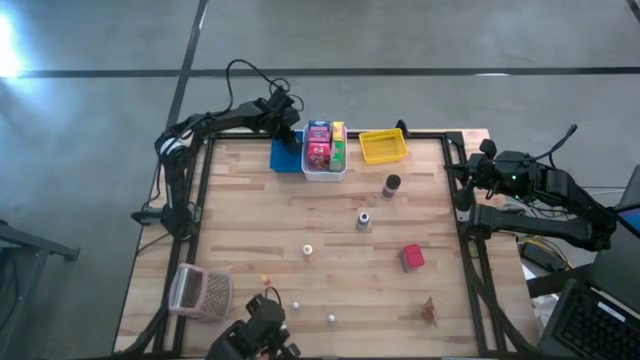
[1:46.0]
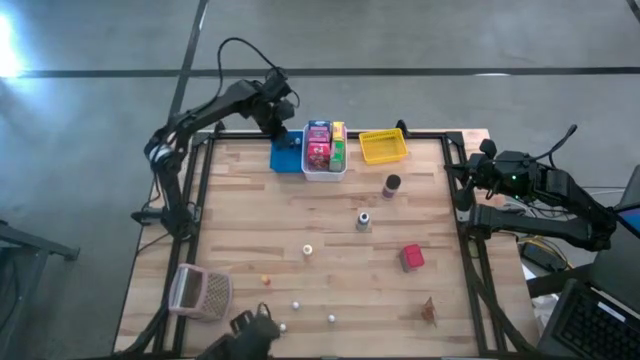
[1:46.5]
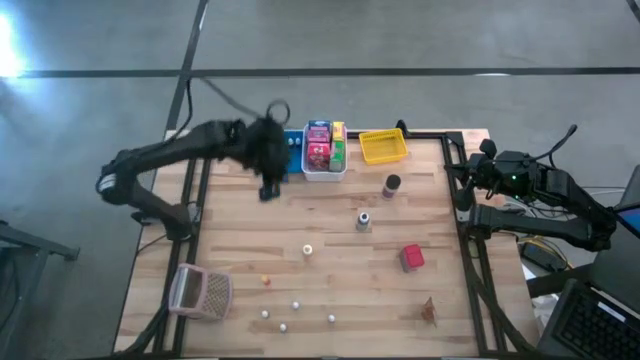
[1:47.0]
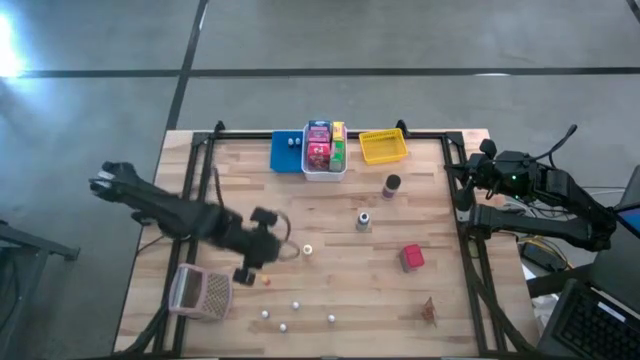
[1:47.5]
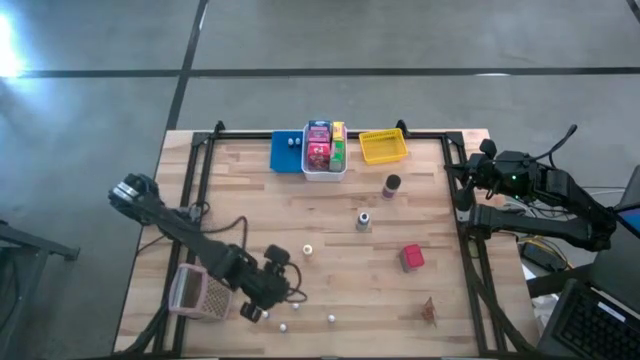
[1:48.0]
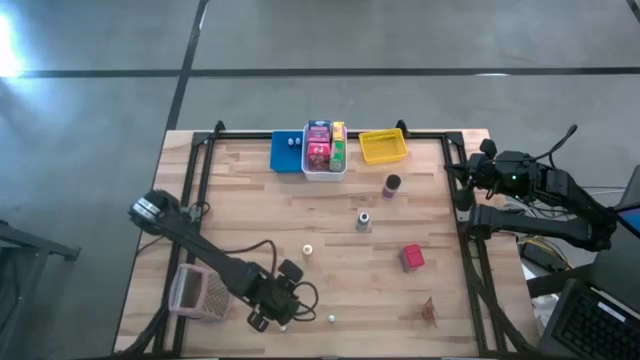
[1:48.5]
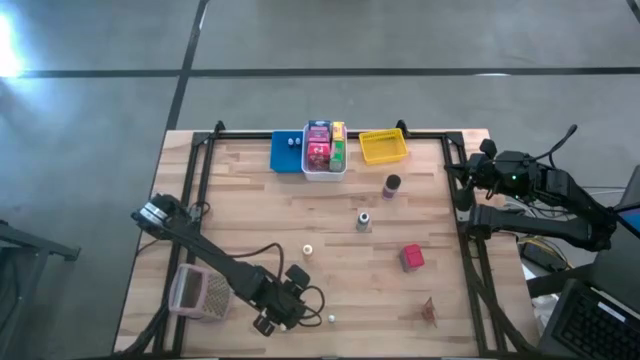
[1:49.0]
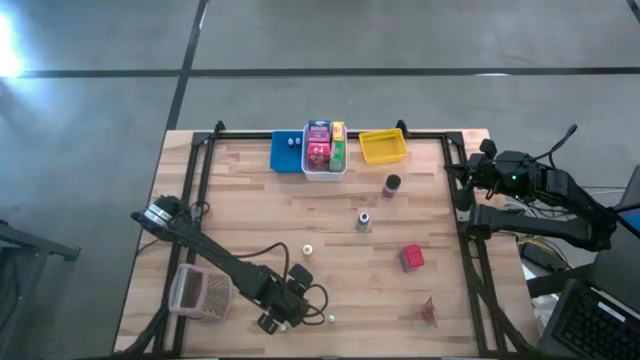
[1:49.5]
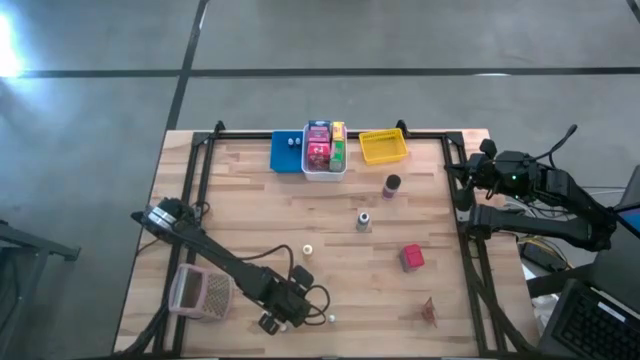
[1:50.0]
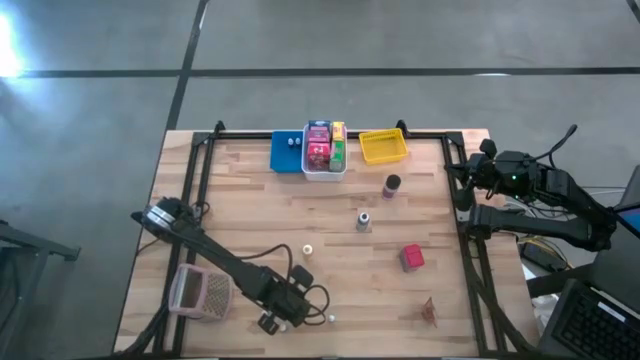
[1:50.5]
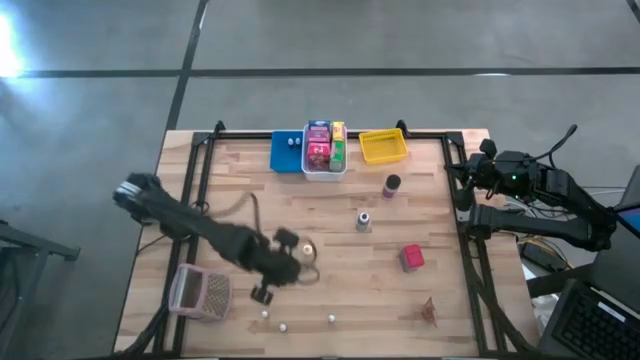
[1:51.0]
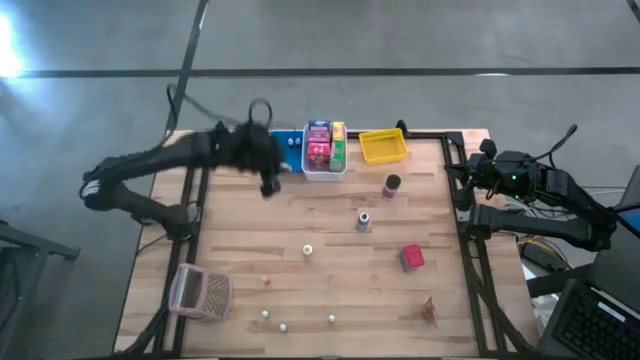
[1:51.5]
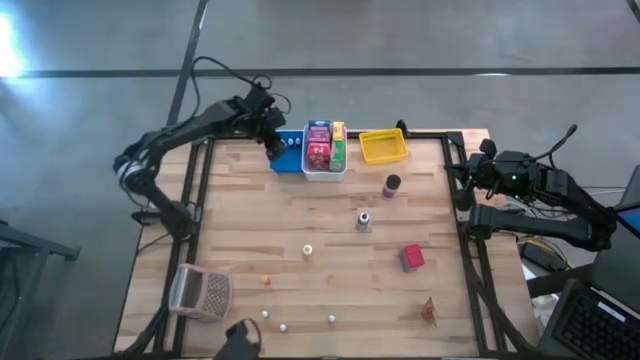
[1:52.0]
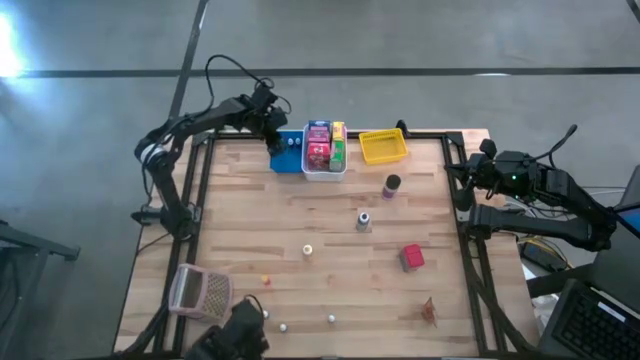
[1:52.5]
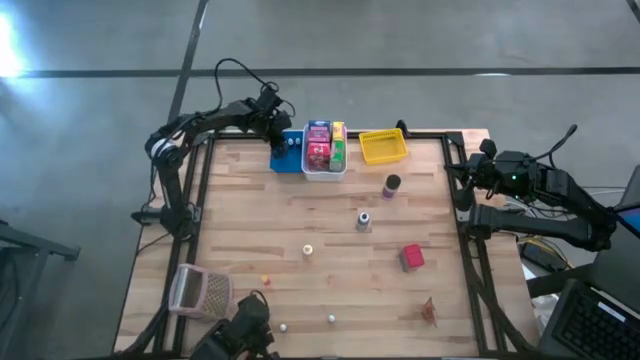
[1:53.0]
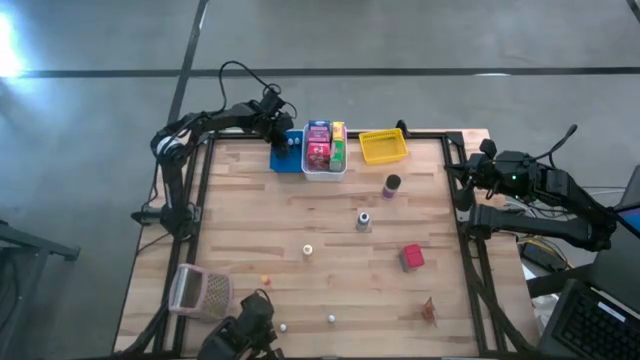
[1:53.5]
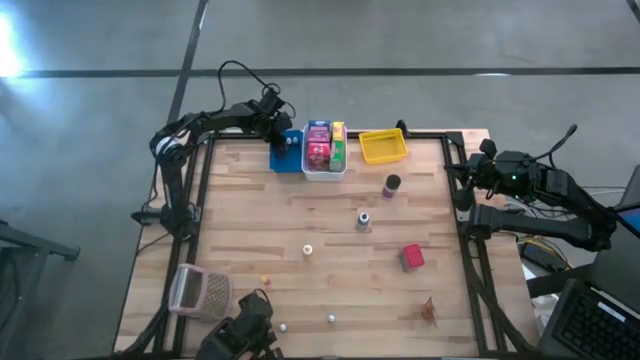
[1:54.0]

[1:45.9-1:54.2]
Task: Pick & Place Kitchen Items
Put the small red food coloring bottle into the blue bin

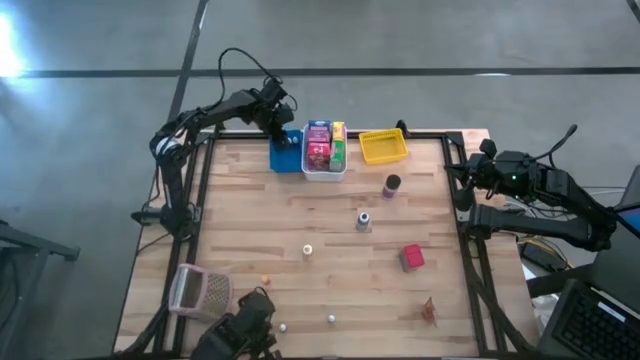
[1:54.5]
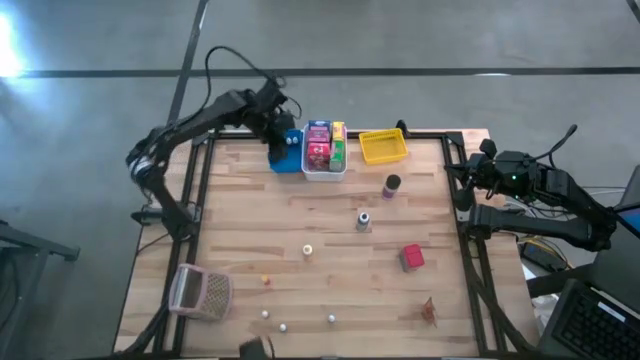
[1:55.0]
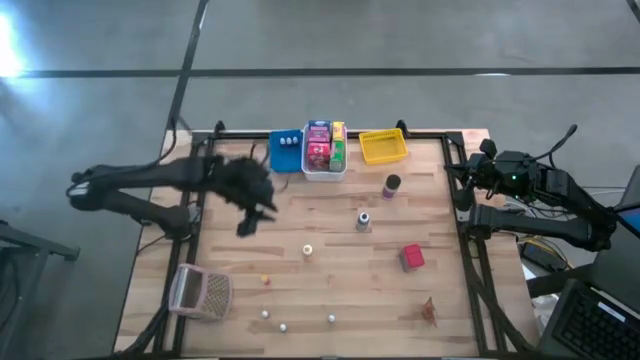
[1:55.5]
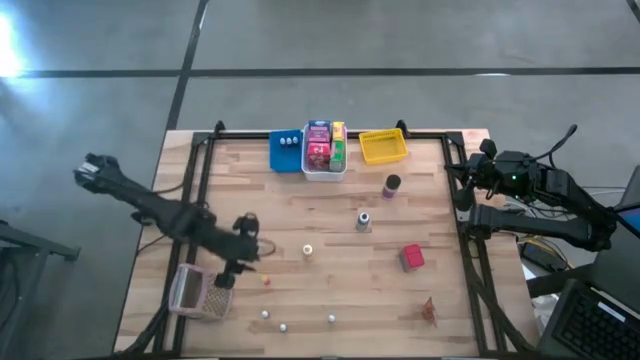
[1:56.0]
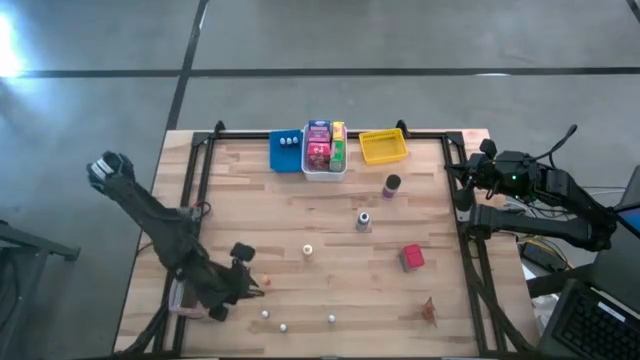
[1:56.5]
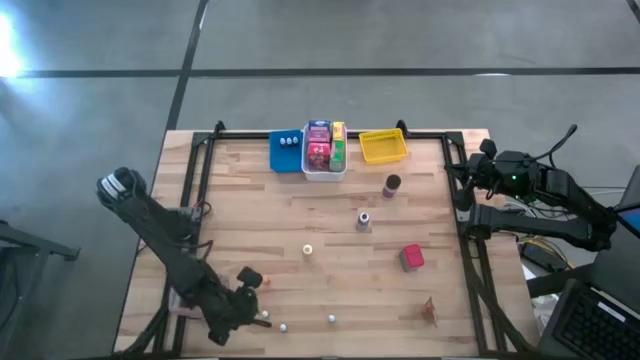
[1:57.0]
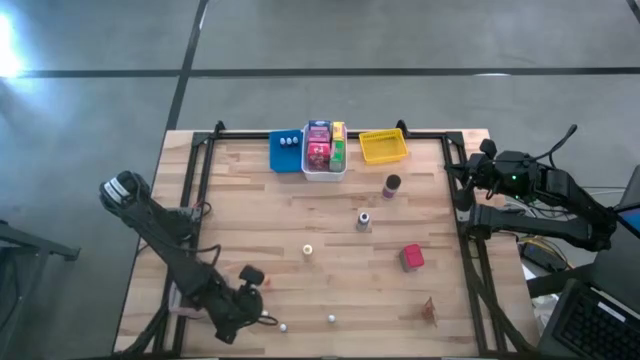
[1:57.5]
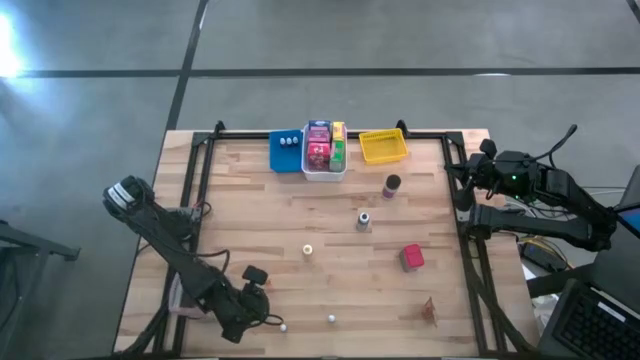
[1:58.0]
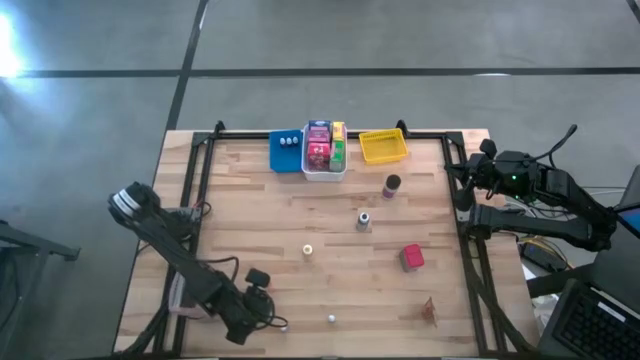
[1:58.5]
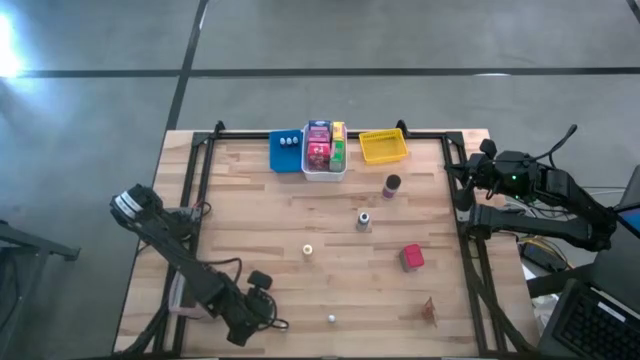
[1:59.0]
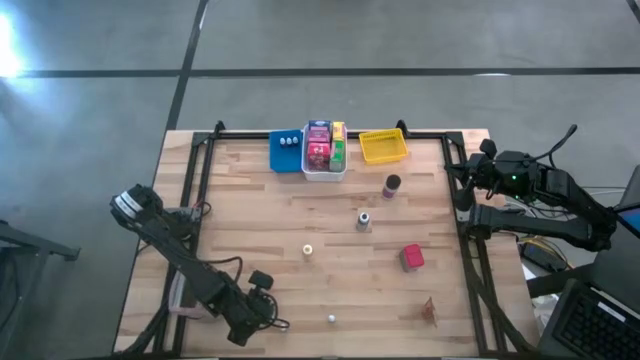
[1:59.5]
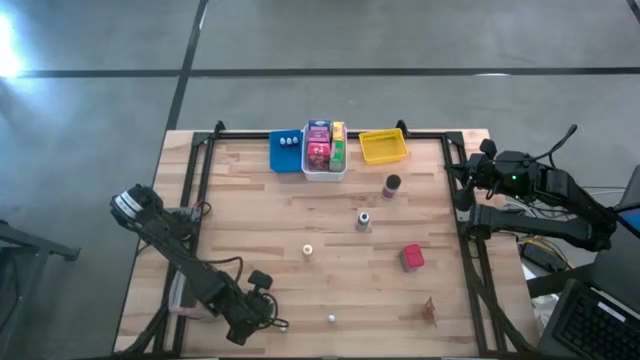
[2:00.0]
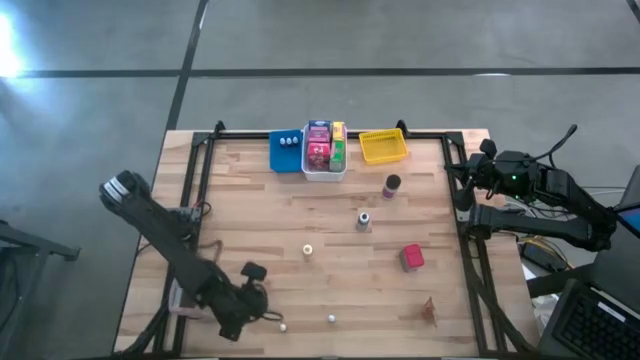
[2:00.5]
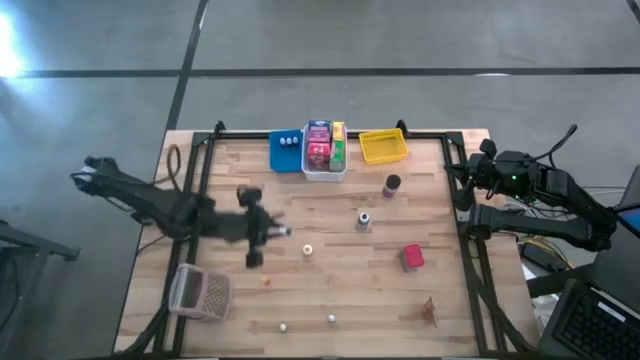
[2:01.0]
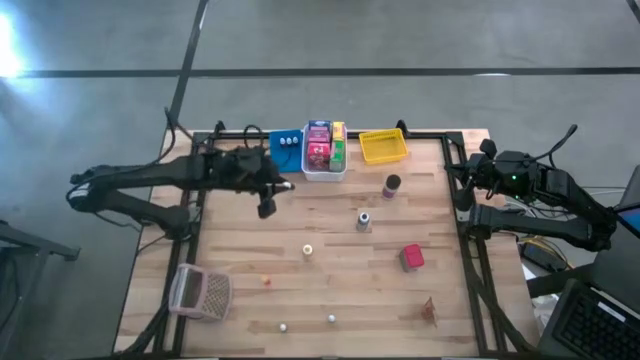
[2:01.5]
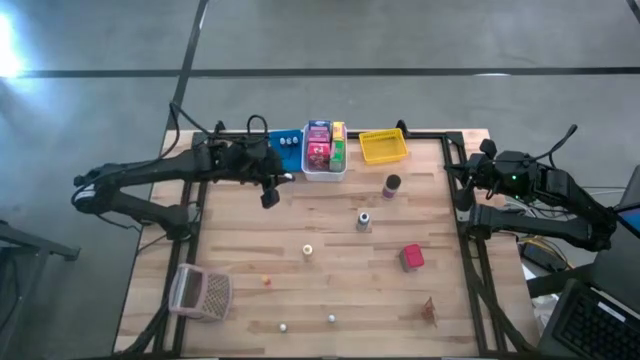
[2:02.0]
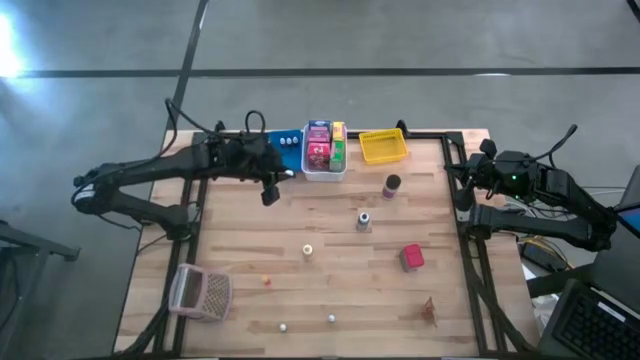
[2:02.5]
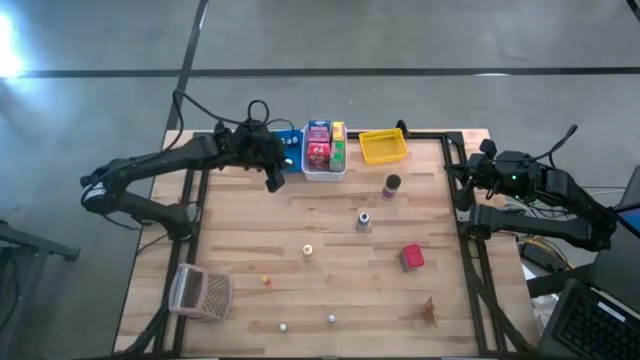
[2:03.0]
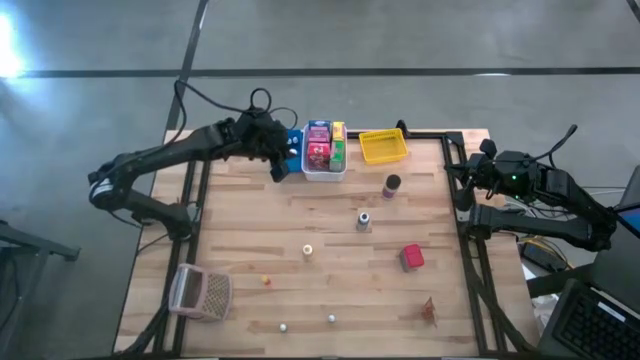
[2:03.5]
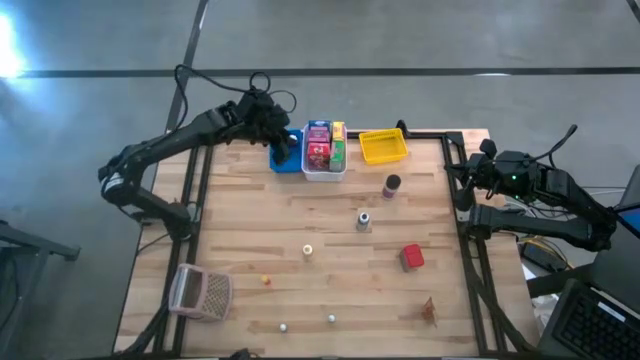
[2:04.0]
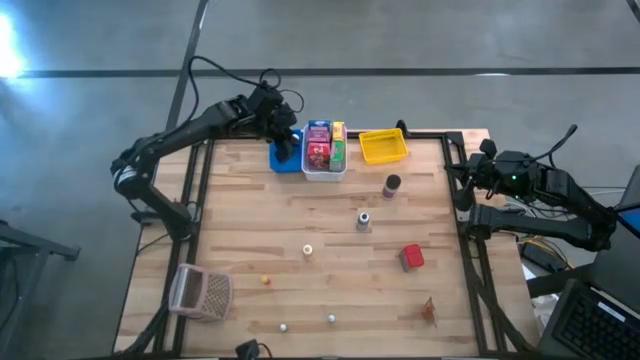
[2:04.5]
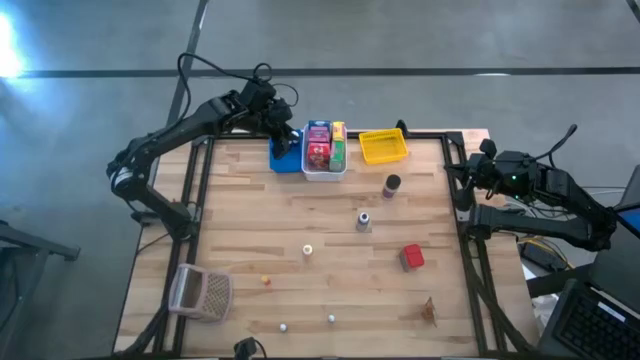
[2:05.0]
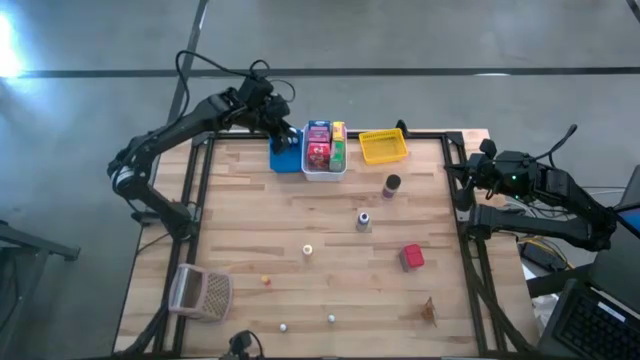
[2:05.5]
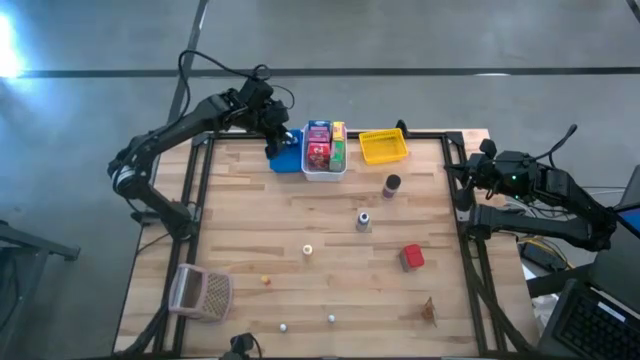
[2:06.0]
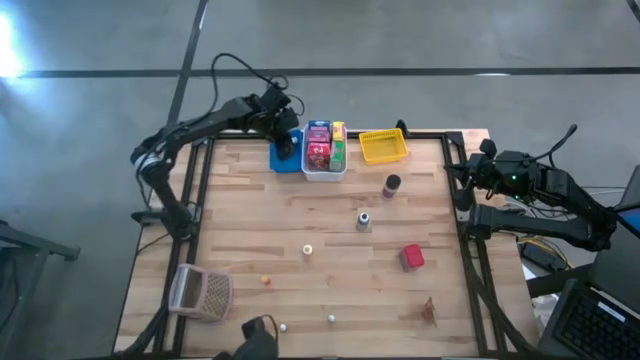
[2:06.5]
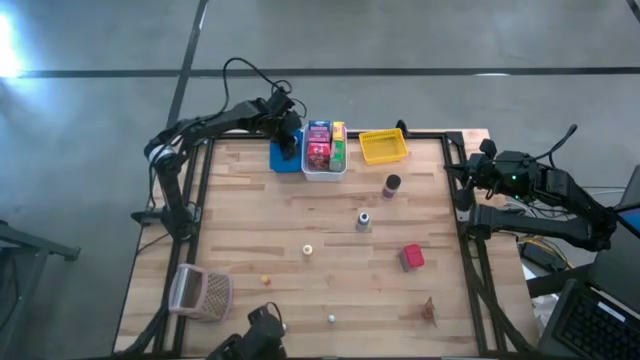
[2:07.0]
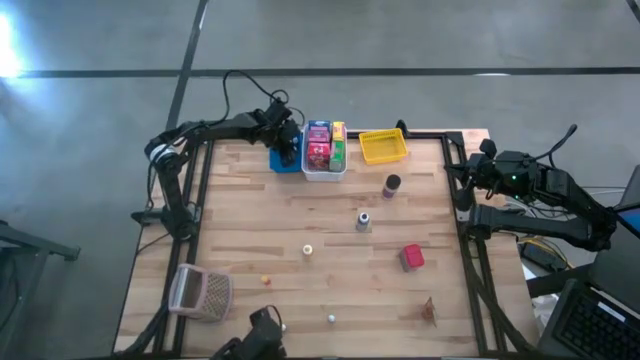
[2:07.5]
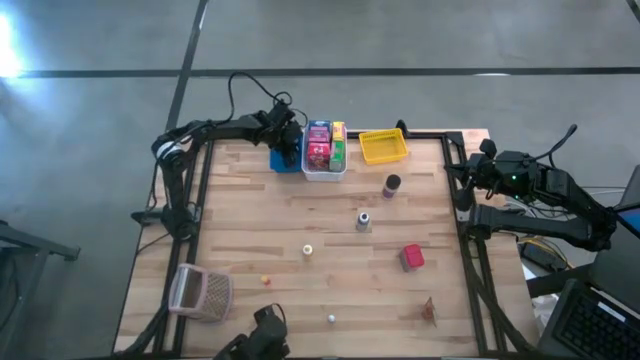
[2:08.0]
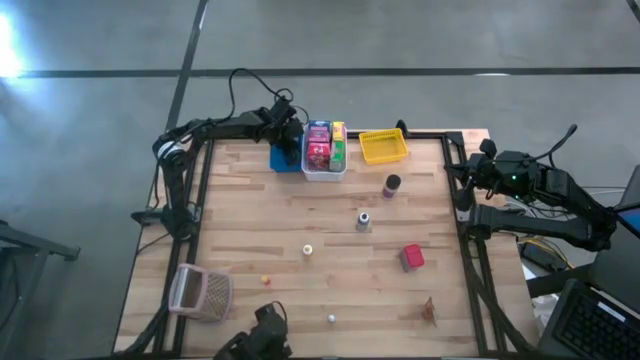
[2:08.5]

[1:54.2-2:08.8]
Put the small top black food coloring bottle into the blue bin
